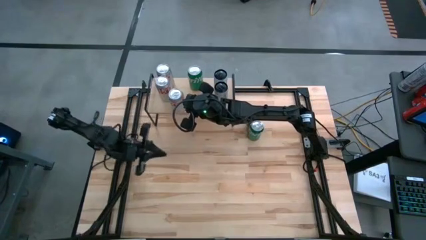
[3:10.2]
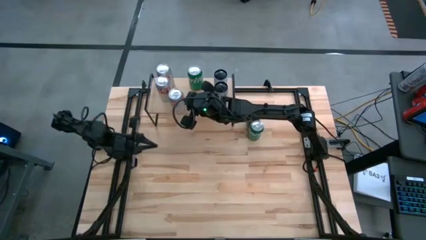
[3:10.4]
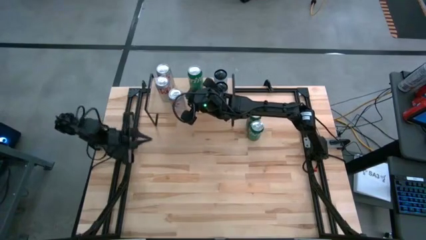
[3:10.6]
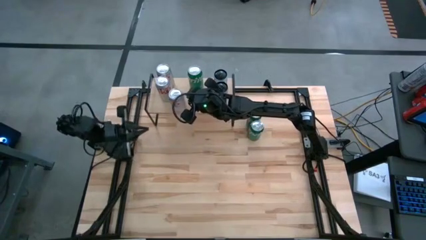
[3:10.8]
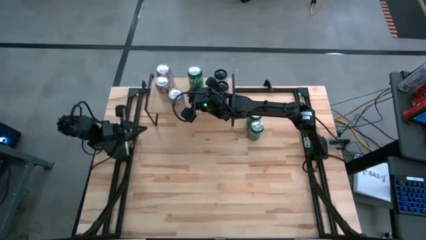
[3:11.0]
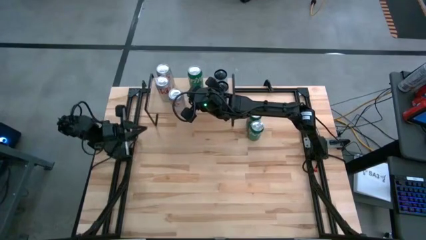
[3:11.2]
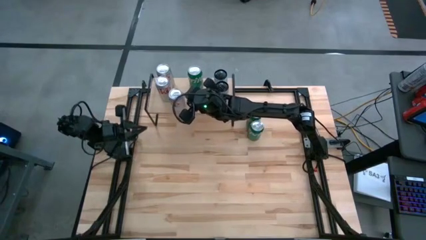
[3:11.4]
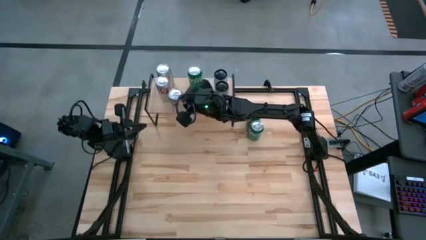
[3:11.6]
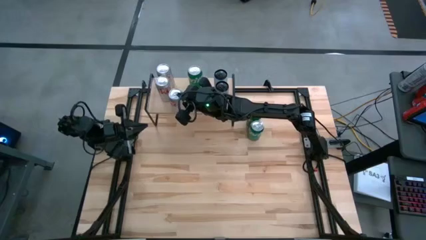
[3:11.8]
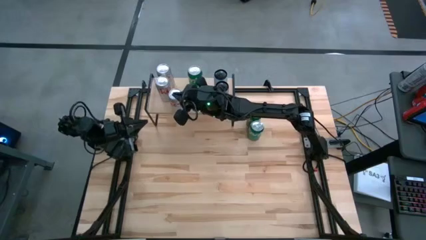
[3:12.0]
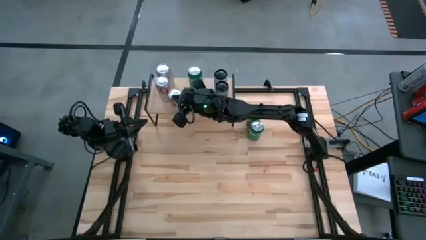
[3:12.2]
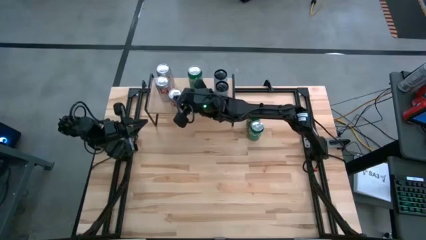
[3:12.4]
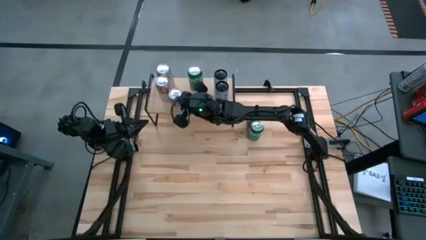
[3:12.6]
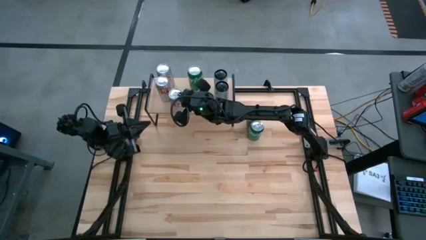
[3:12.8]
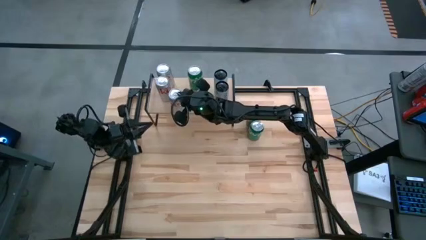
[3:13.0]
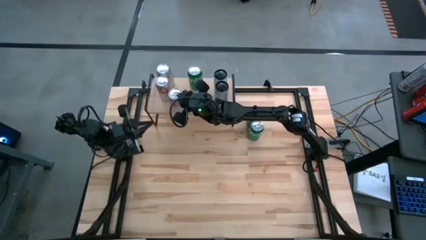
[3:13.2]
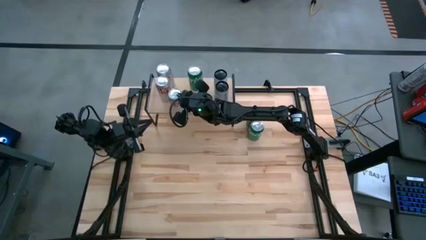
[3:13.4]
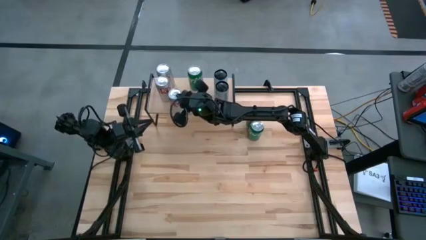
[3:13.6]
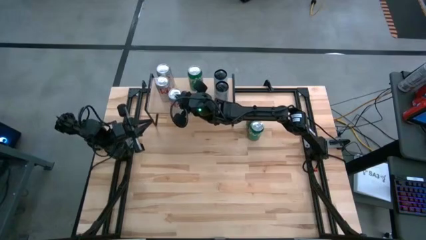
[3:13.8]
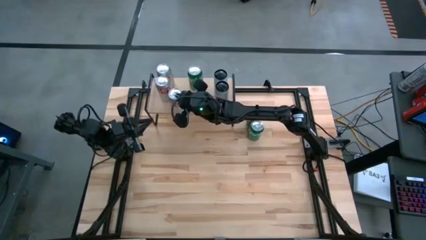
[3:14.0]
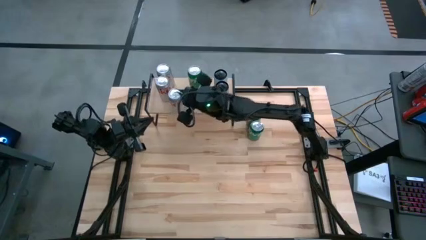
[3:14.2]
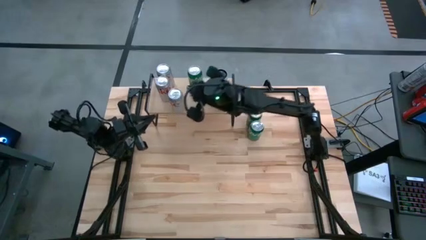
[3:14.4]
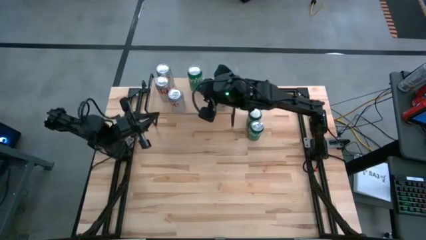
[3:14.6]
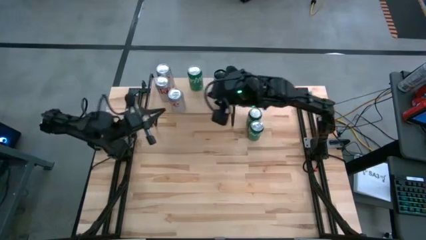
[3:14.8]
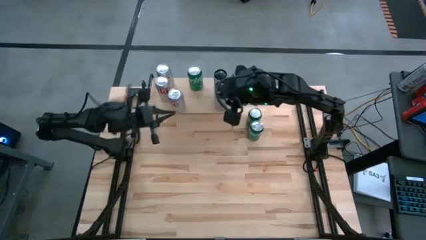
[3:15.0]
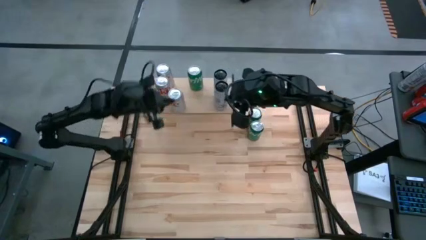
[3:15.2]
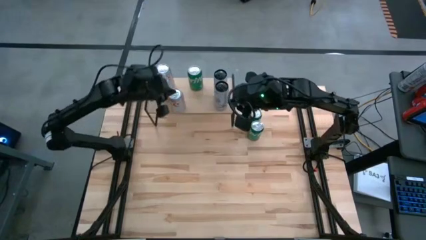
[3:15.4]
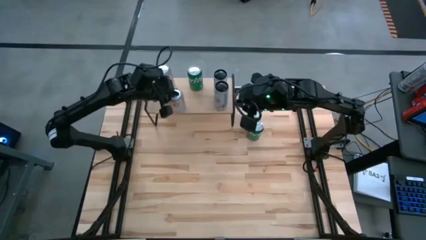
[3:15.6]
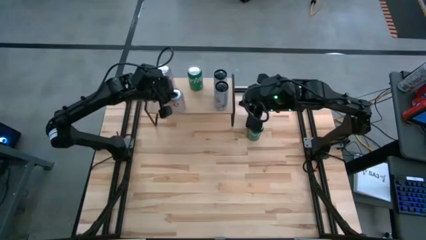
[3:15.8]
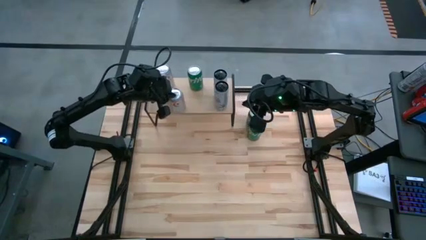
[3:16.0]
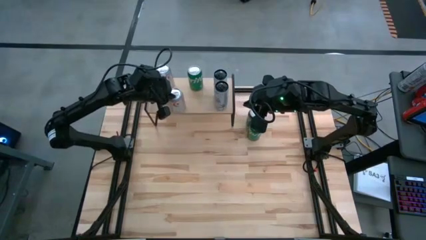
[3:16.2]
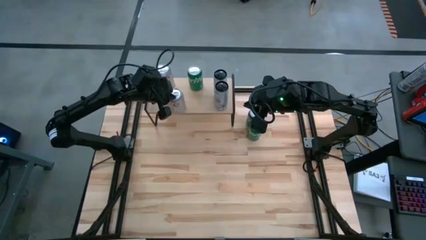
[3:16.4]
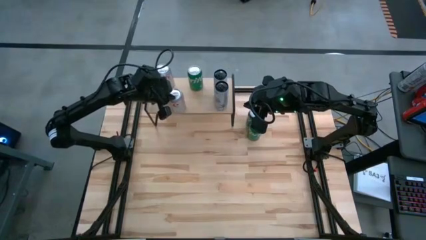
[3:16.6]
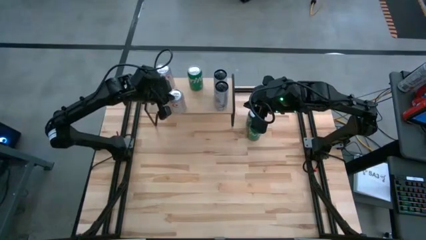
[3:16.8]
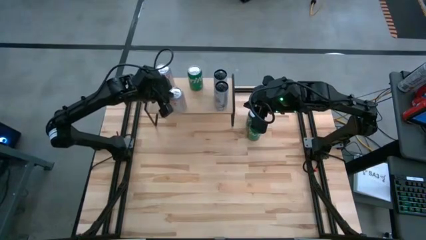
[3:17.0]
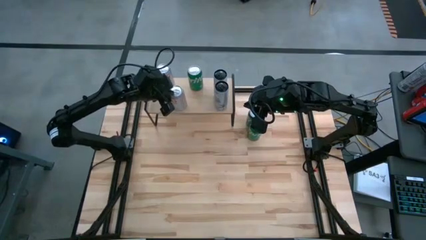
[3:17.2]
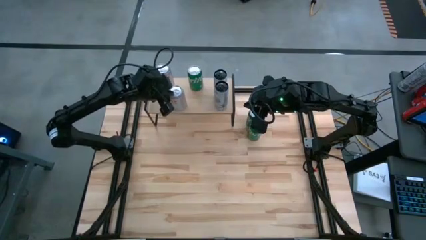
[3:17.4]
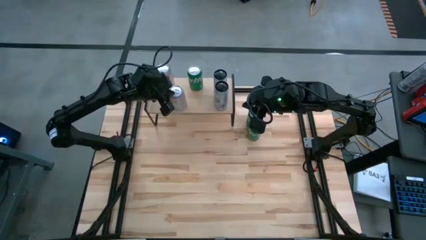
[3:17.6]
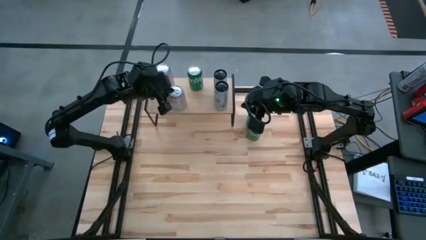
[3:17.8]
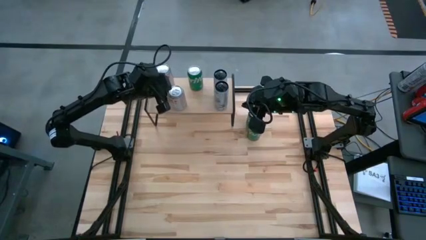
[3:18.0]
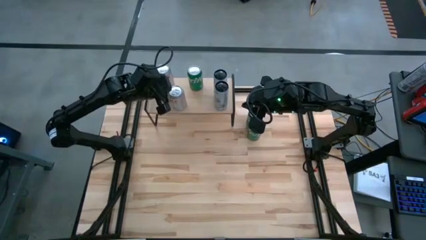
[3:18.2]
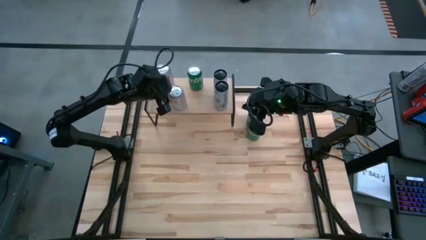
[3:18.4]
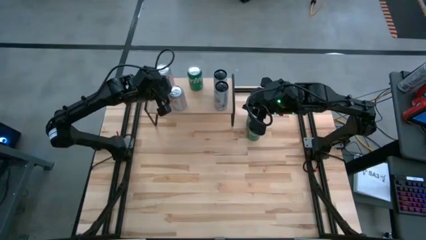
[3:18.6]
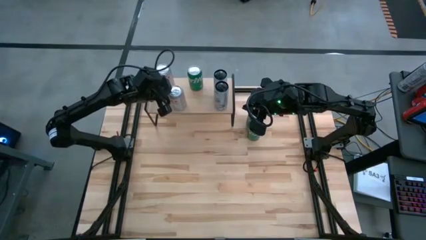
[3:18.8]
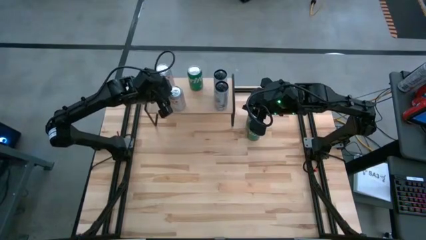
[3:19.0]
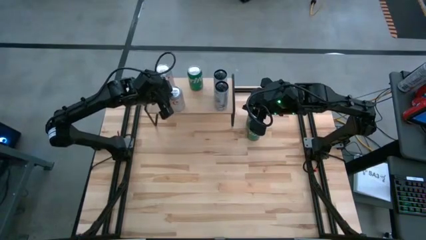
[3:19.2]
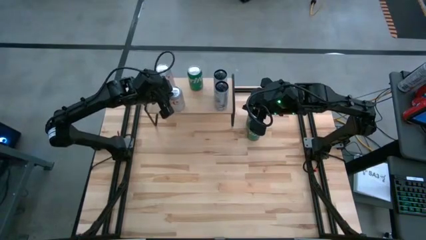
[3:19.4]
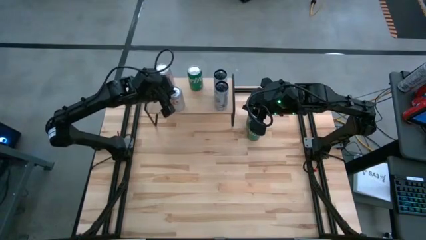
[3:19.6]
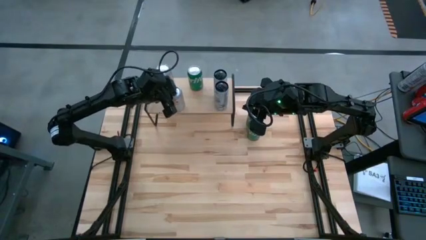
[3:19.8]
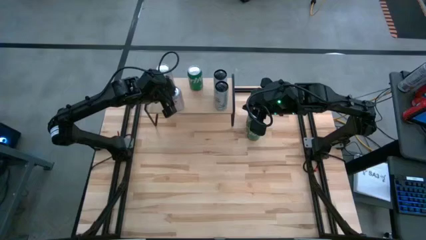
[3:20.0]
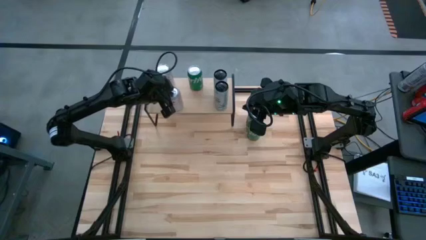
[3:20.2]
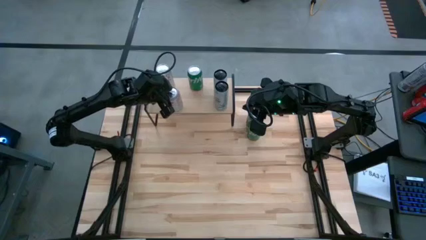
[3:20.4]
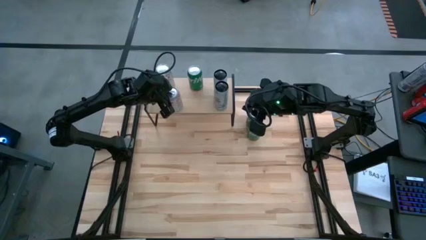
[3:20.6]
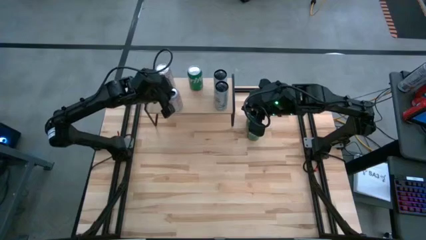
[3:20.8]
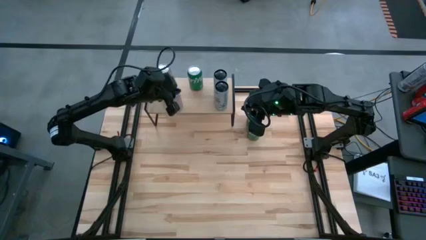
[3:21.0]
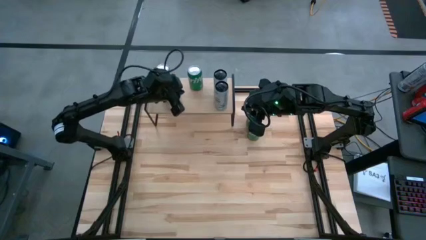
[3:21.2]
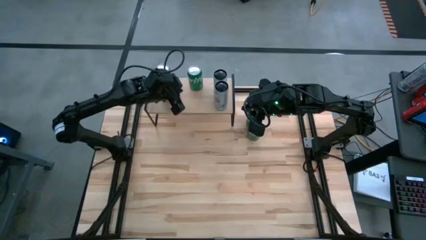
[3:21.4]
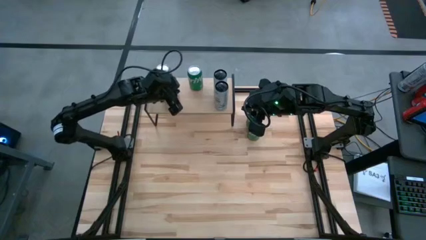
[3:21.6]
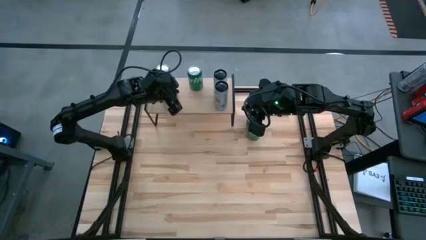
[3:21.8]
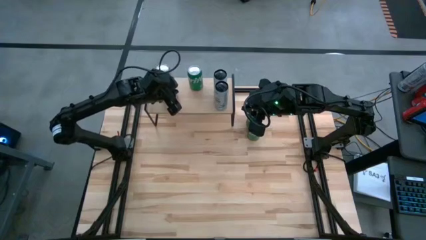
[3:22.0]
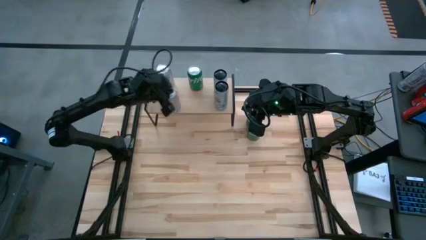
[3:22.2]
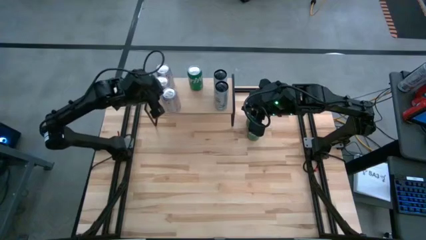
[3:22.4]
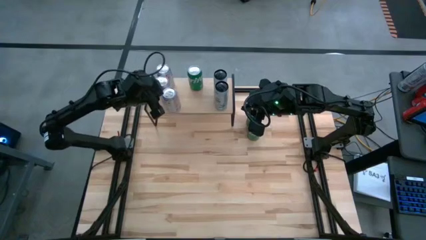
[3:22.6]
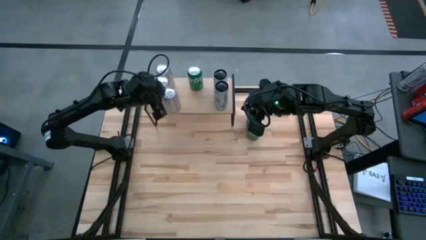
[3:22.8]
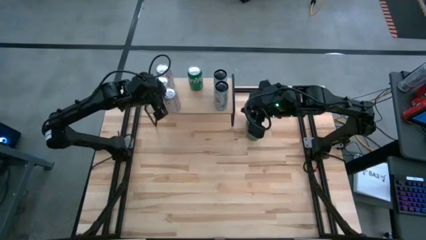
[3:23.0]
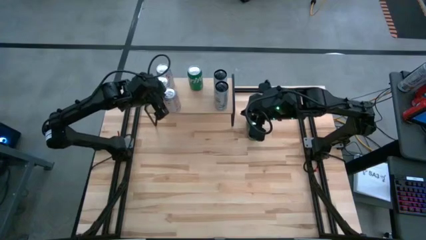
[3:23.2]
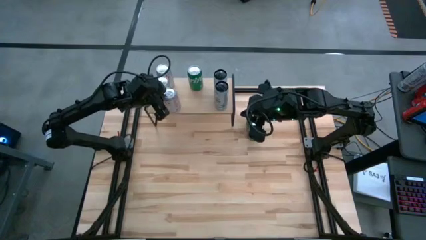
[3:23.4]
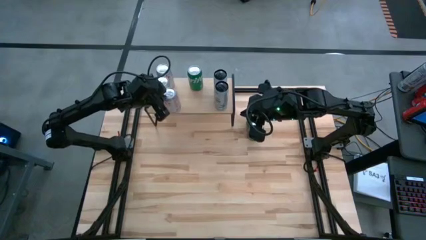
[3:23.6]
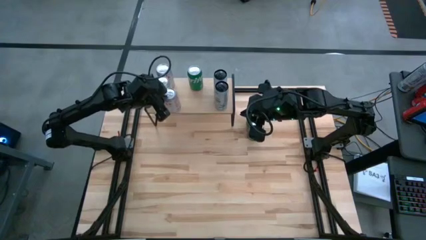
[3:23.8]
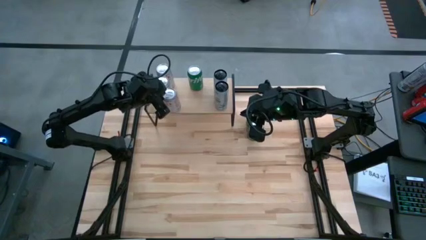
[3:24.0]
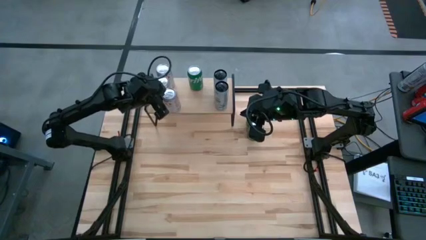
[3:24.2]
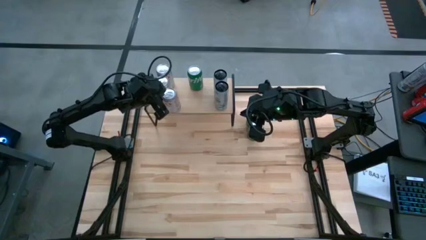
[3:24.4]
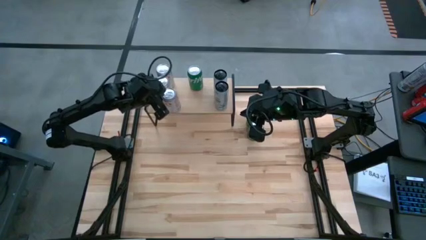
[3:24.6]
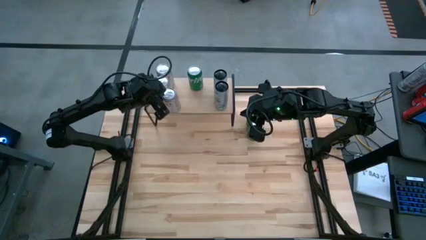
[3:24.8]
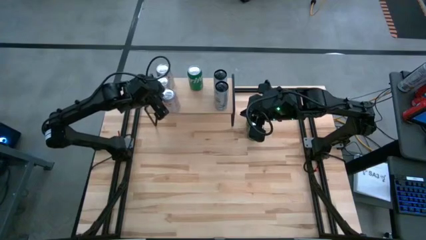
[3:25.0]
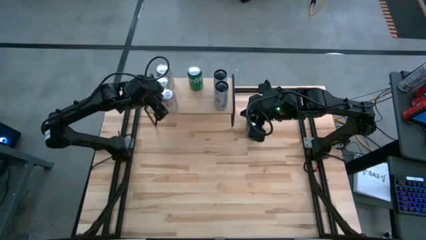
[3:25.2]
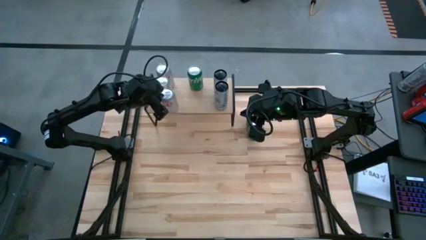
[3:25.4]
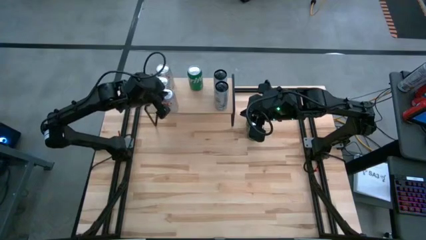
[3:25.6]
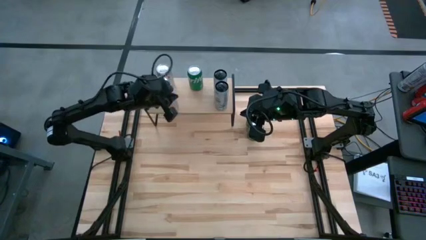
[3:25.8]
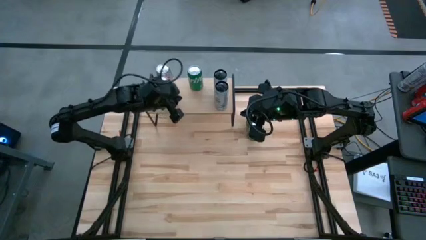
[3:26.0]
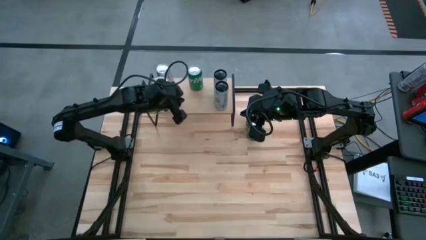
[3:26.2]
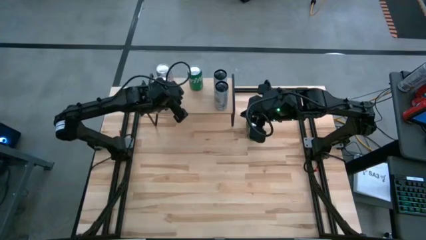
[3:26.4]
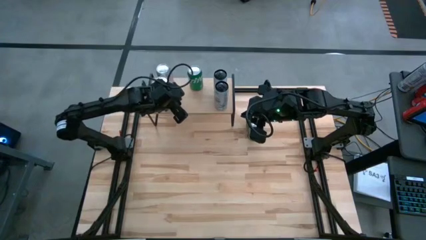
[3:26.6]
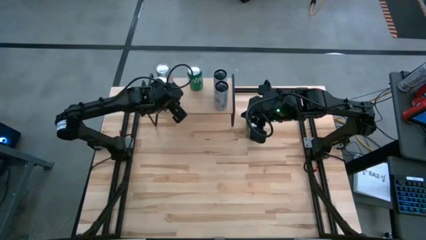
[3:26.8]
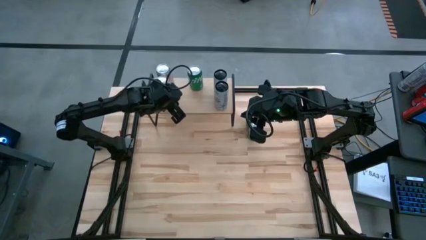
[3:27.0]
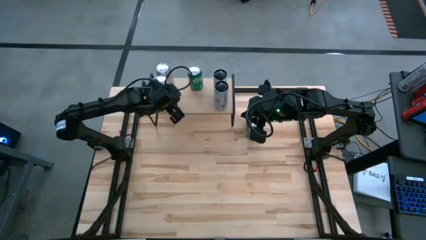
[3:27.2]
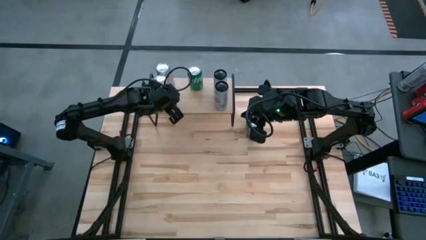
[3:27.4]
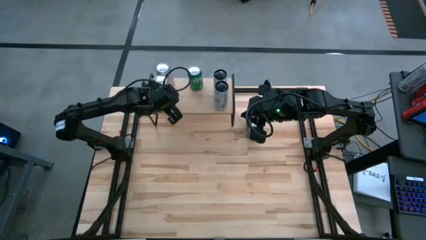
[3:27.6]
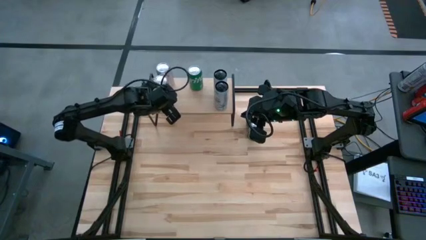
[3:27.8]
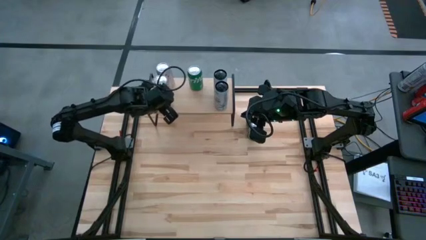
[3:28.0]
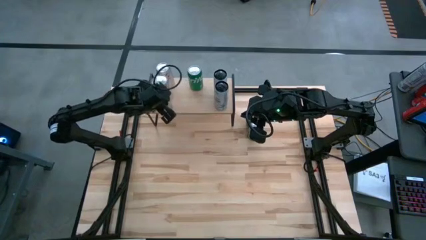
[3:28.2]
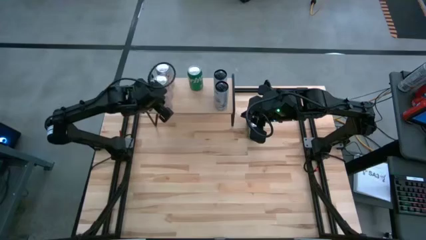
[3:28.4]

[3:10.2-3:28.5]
Task: Place canned beverage on shelf
Put the red-silver soda can aligned with the other red-silver soda cans on the shelf
